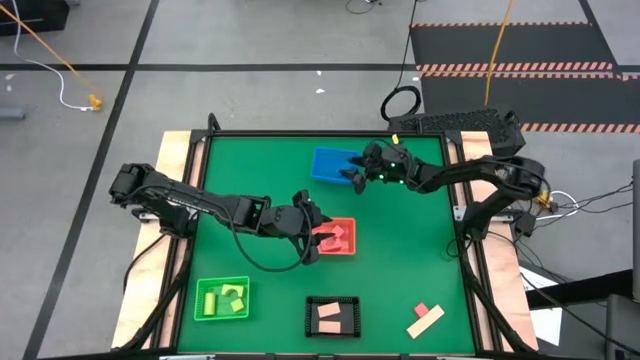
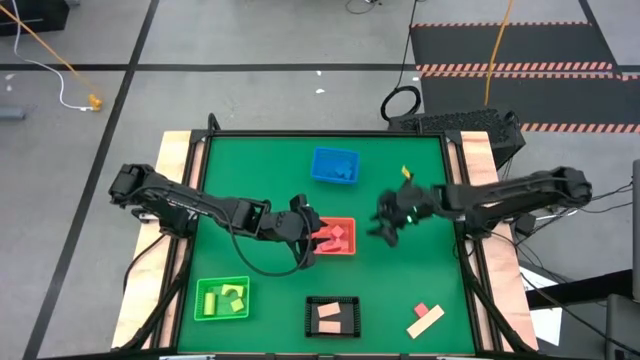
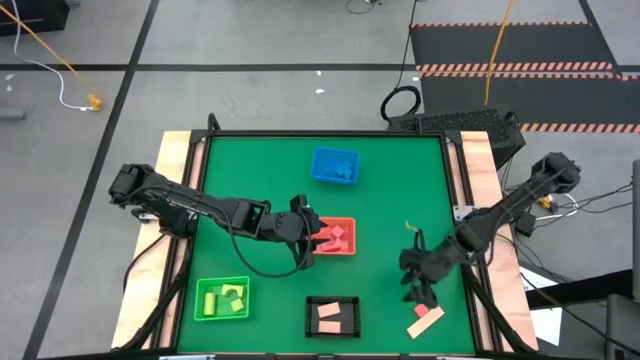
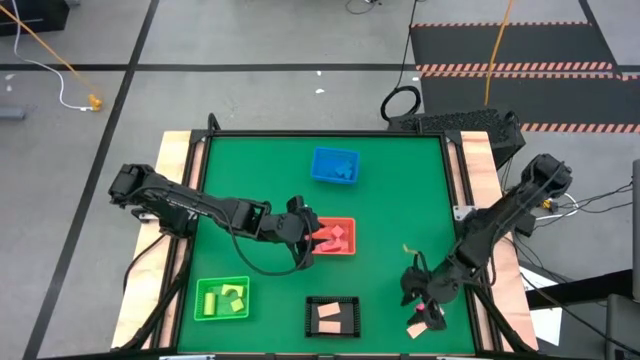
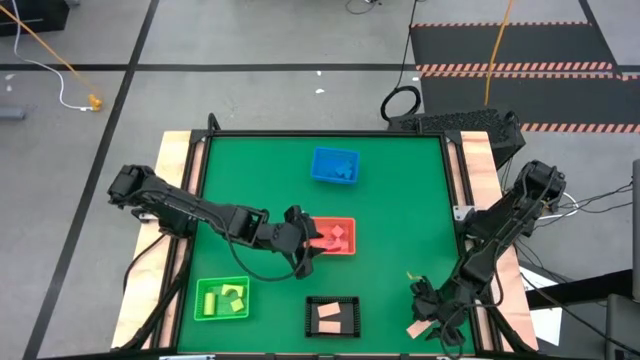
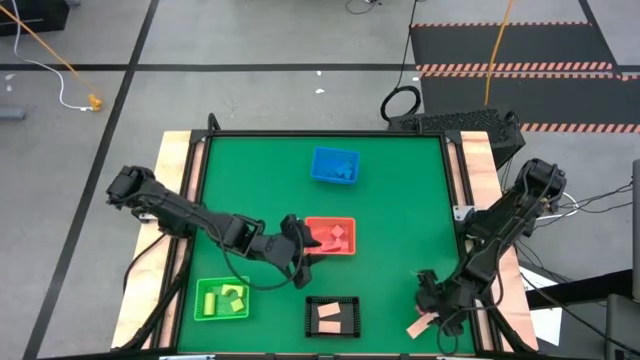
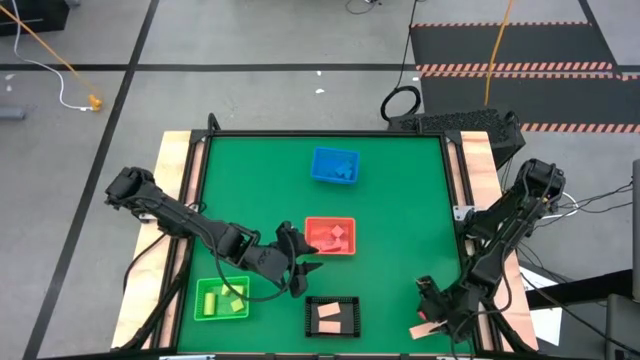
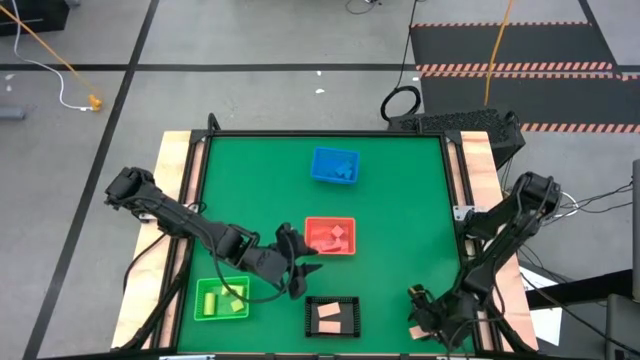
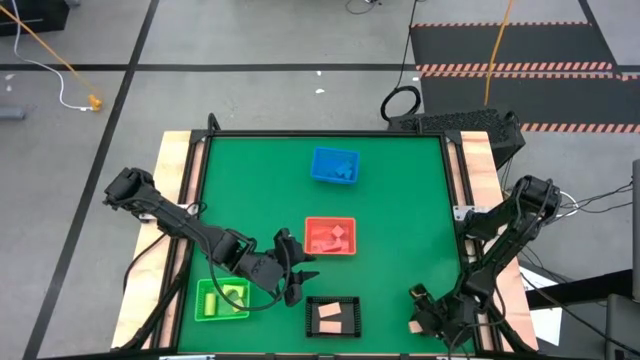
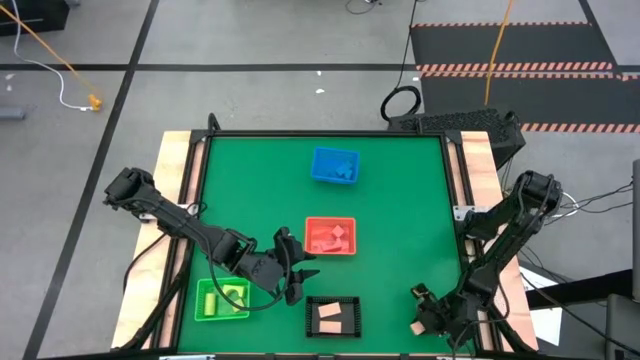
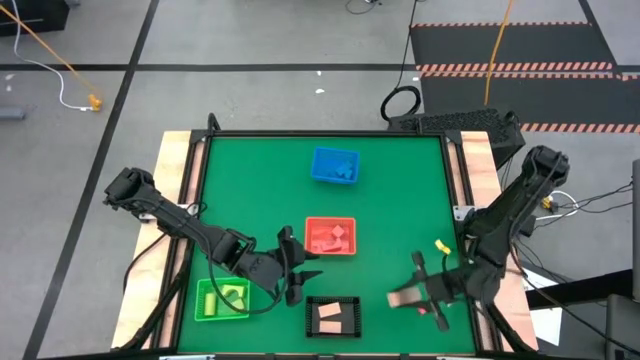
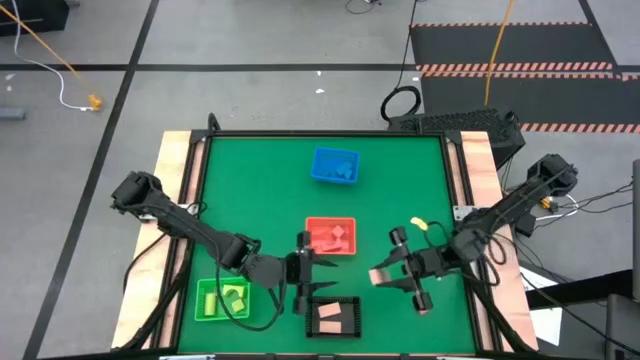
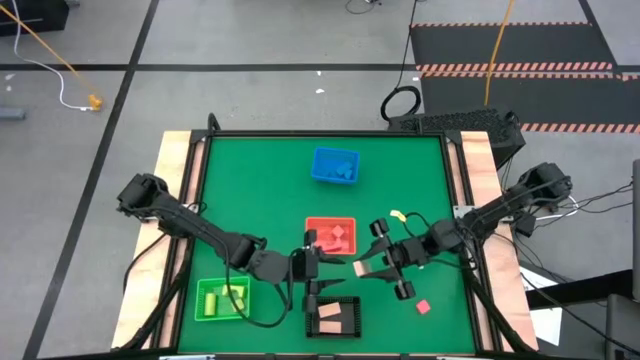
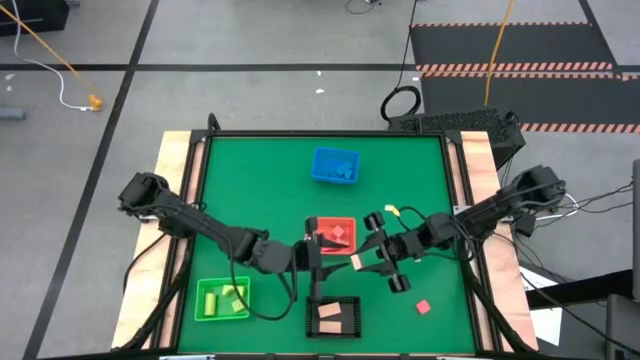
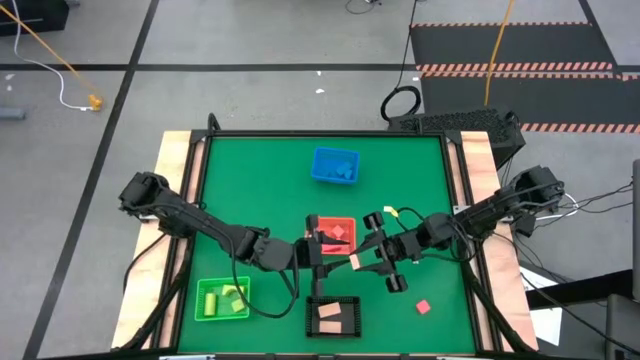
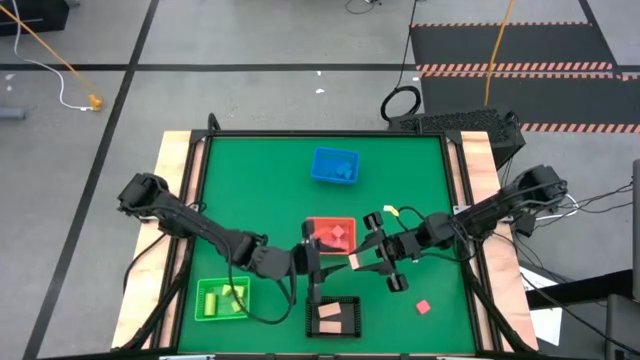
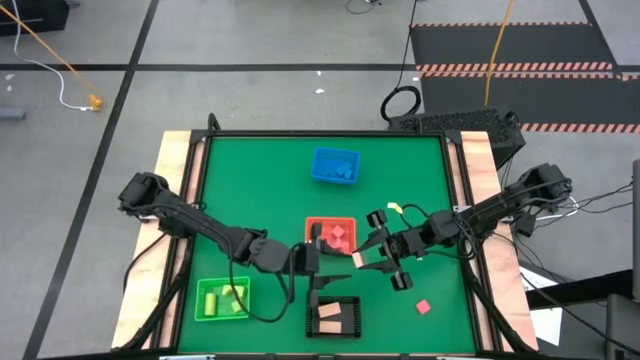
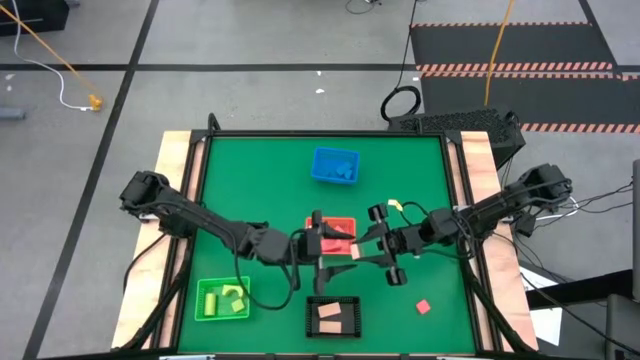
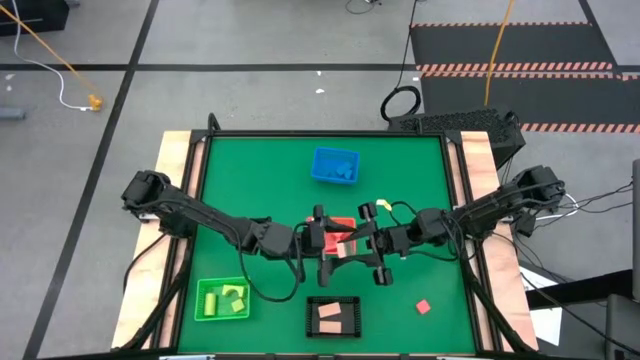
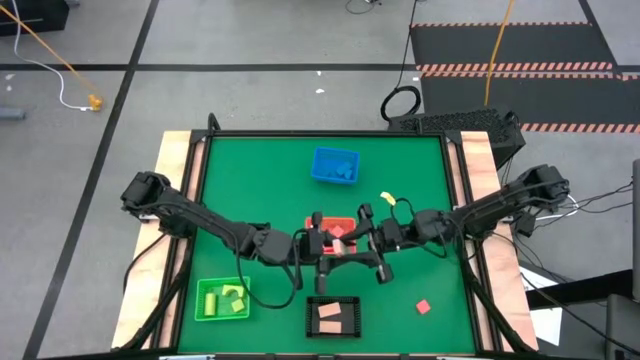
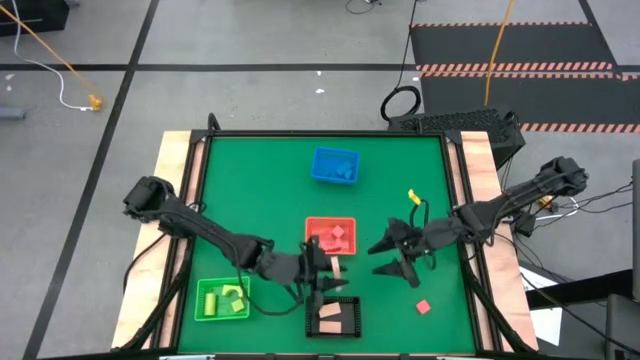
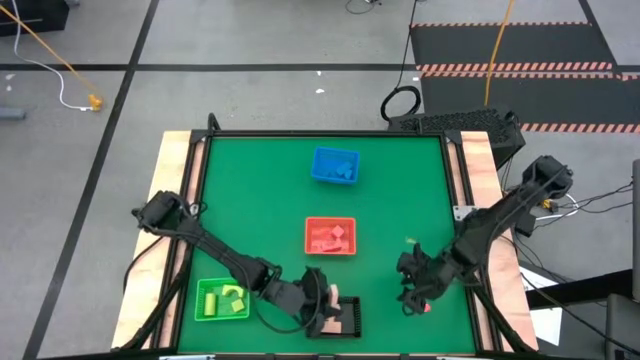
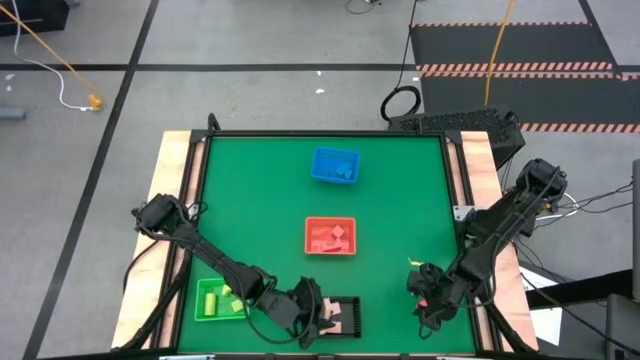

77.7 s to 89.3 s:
Task: Sort & place blocks by color
Put the brown block into the black bin

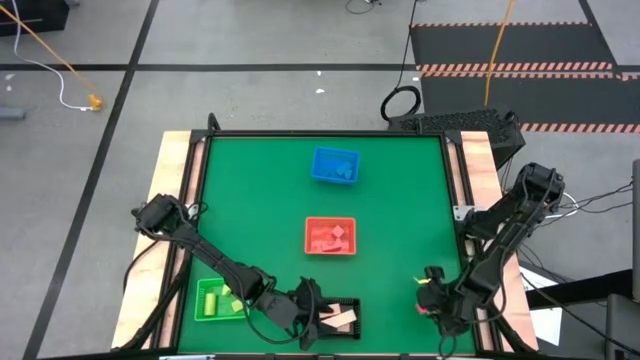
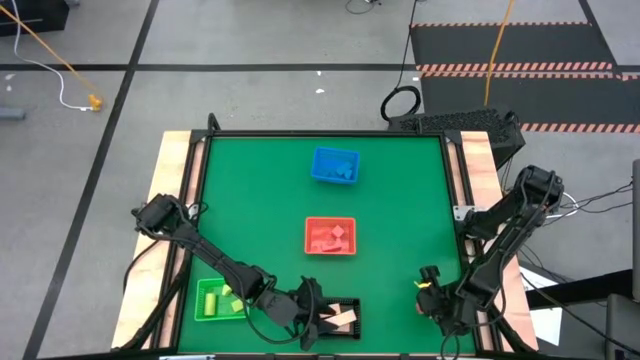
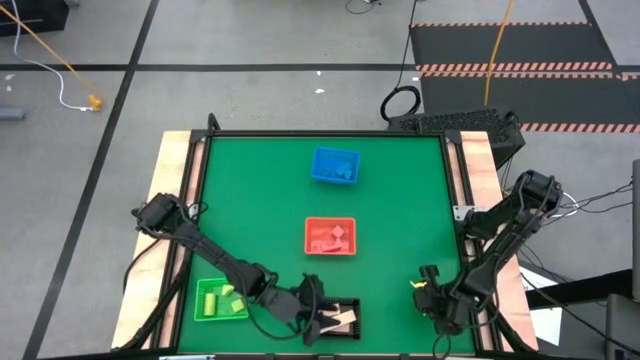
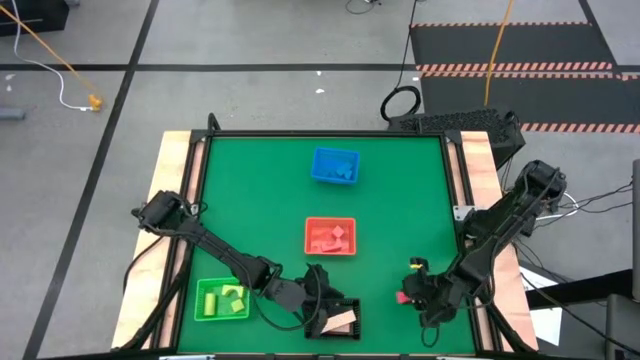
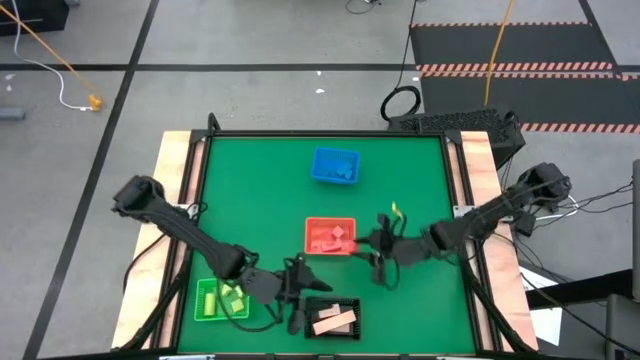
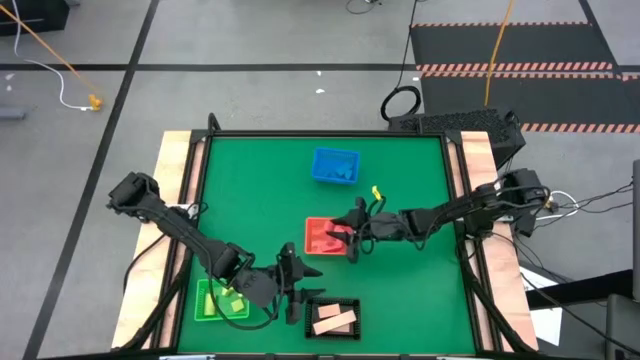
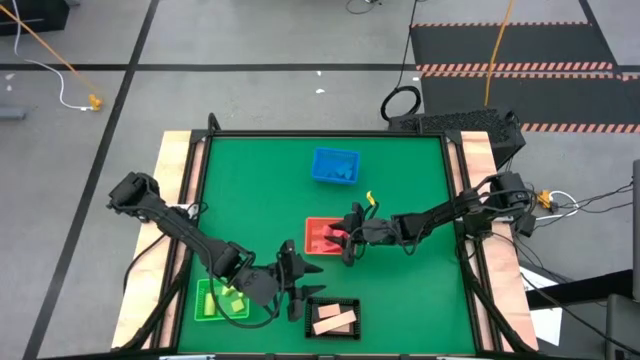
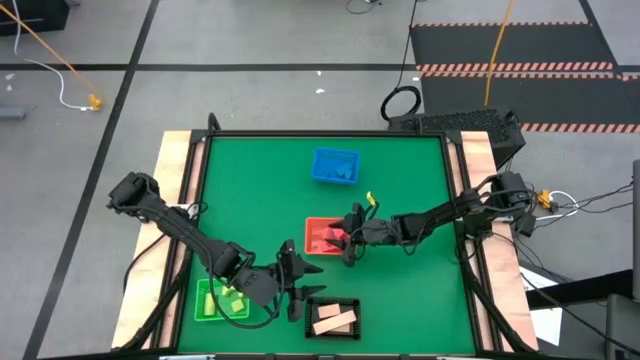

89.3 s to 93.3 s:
Put the orange block into the orange bin

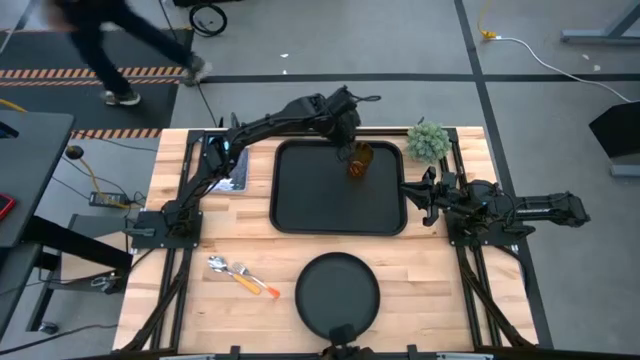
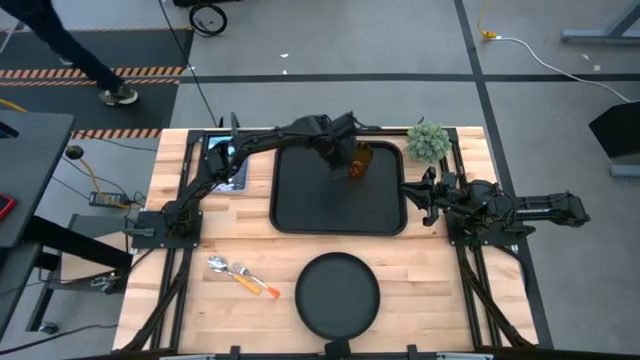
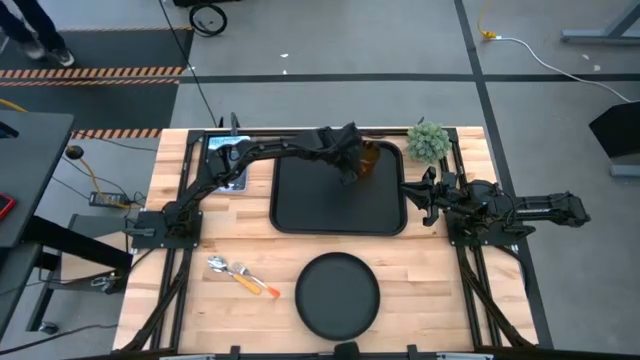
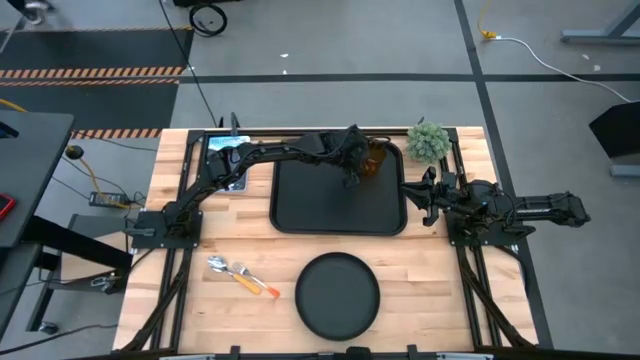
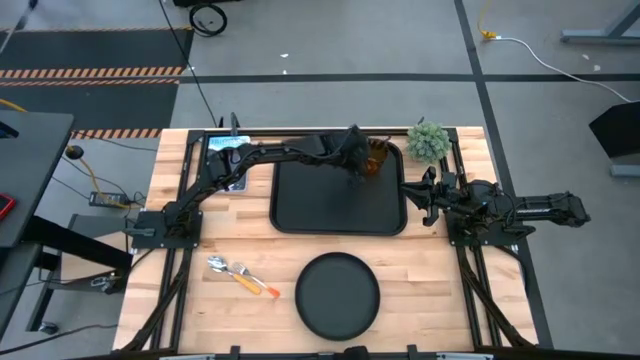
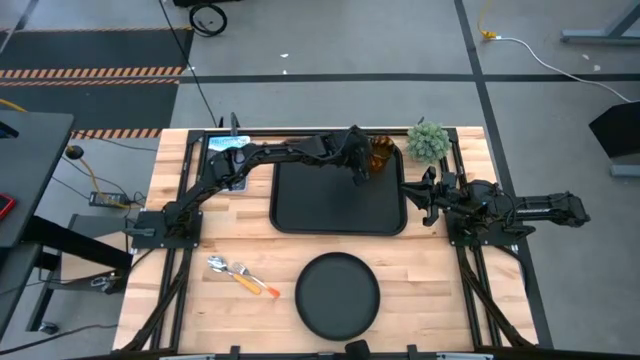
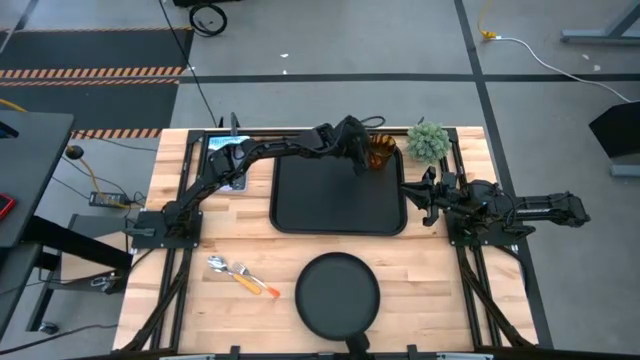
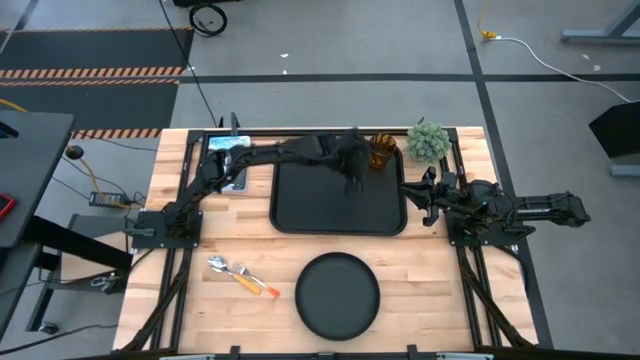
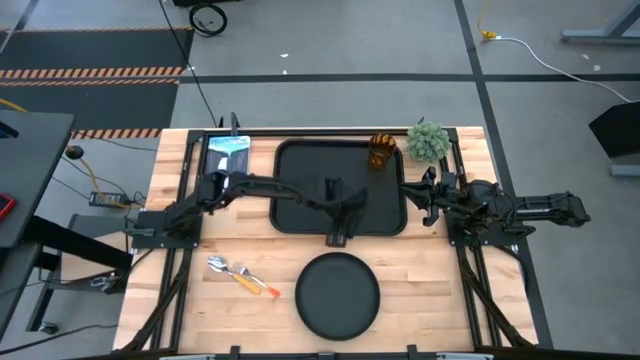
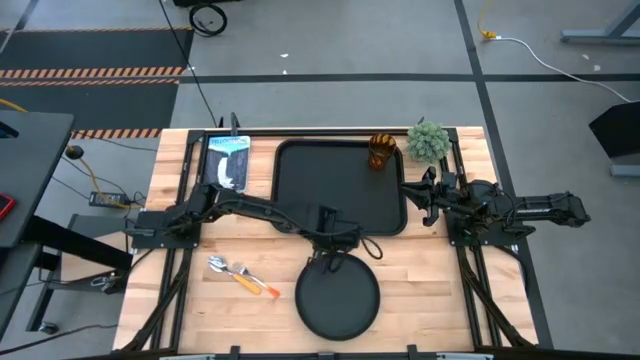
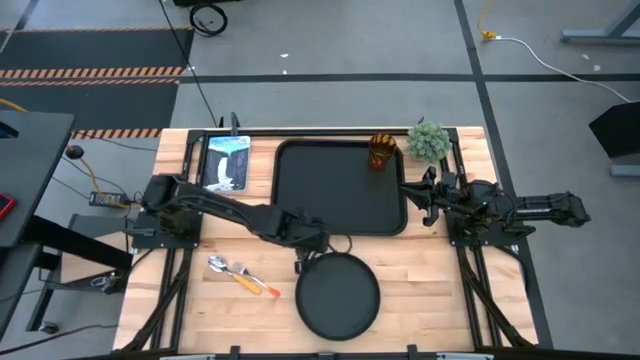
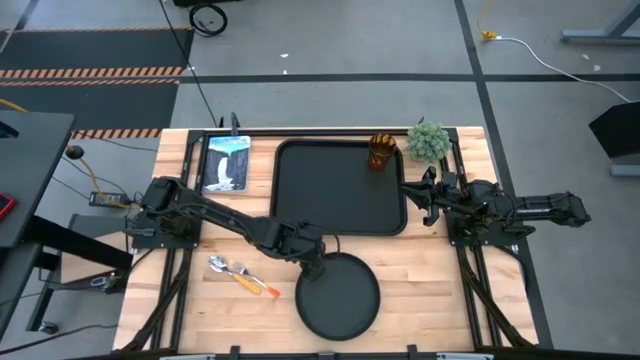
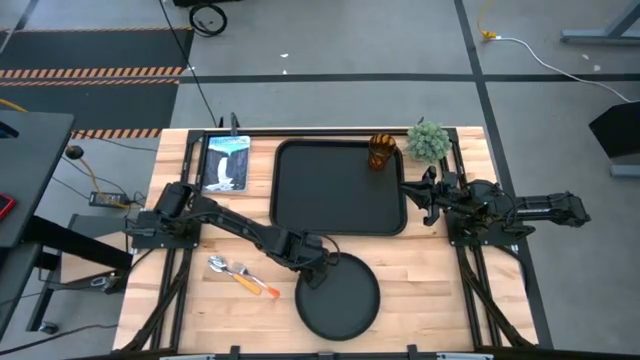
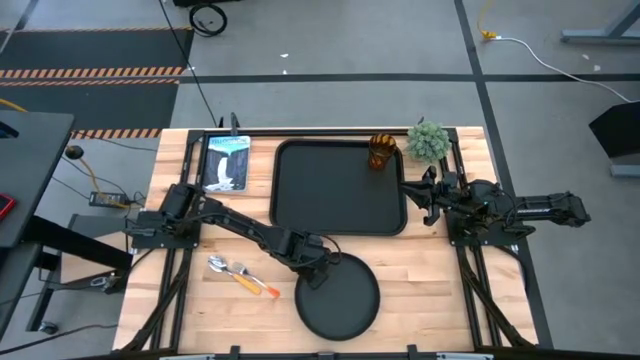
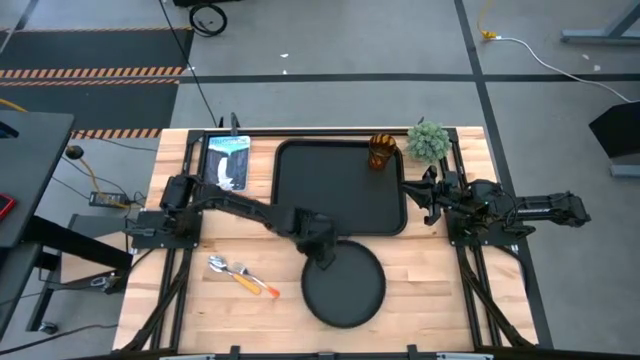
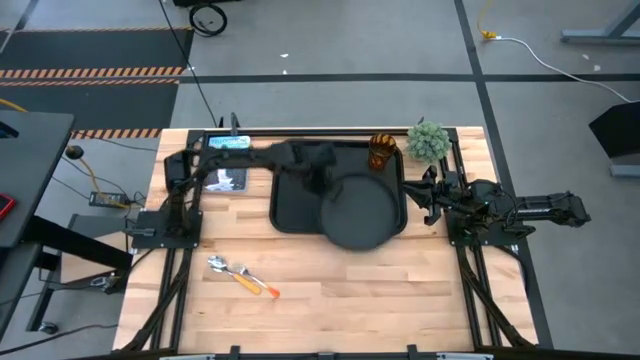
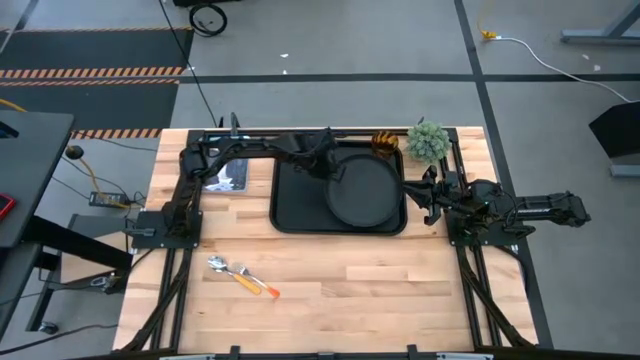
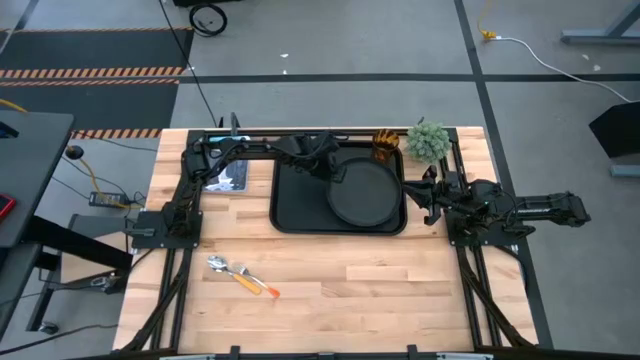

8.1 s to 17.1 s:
Task: Pick and place plate/cup/fork/spoon on tray
Put the black plate onto the black tray
